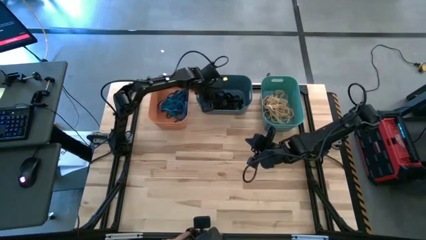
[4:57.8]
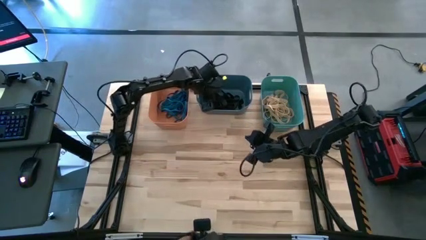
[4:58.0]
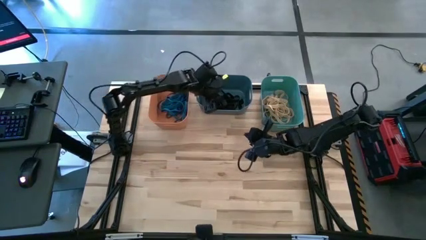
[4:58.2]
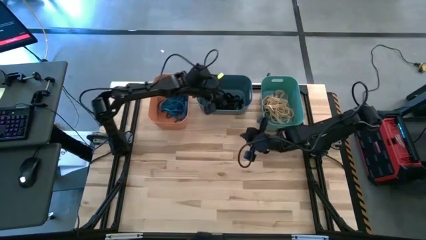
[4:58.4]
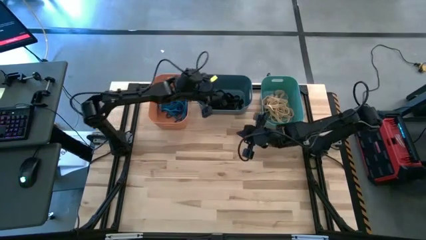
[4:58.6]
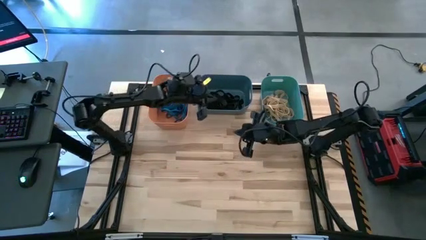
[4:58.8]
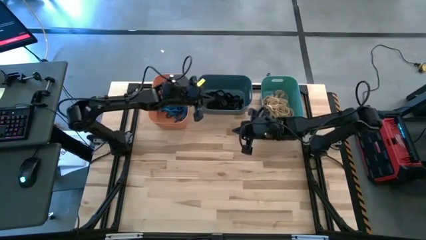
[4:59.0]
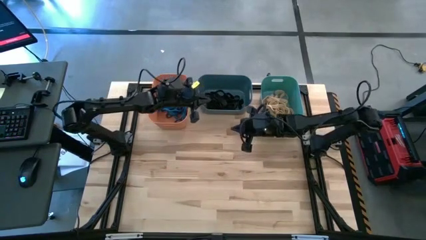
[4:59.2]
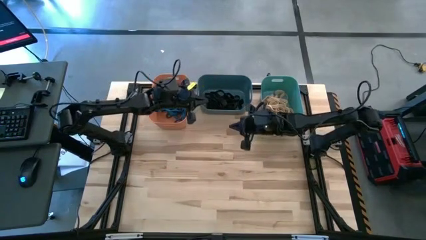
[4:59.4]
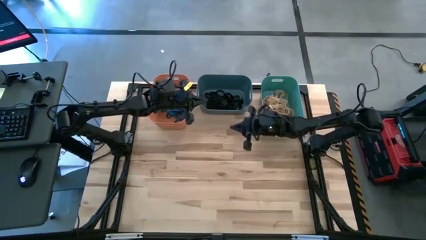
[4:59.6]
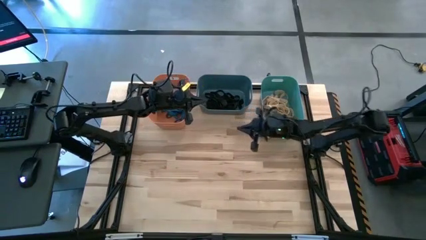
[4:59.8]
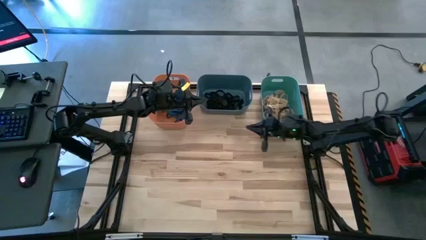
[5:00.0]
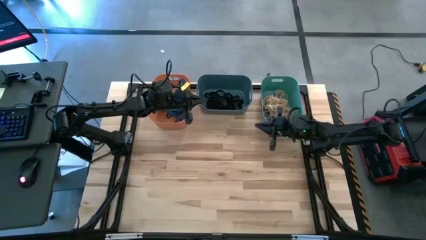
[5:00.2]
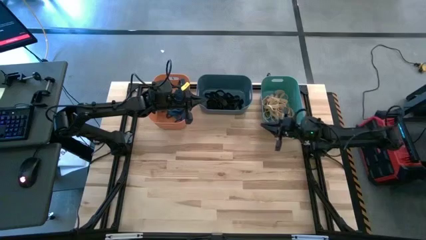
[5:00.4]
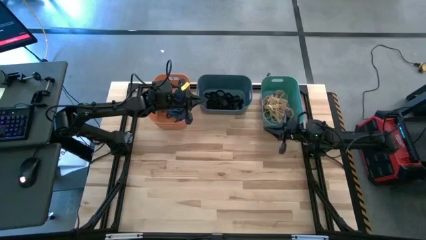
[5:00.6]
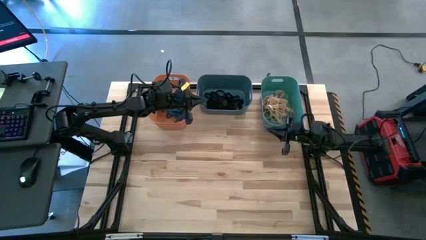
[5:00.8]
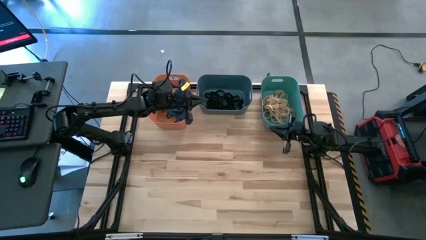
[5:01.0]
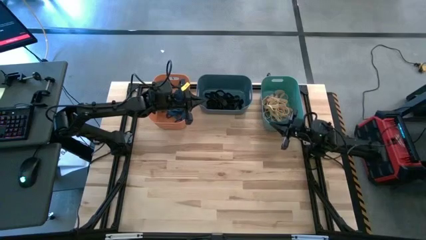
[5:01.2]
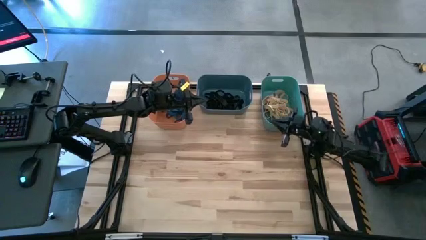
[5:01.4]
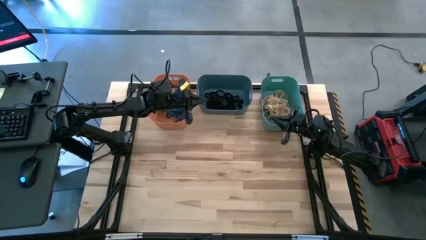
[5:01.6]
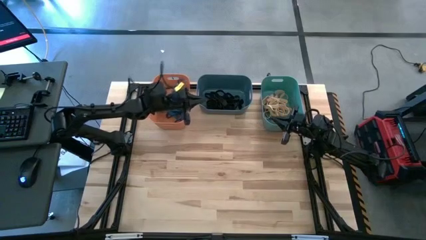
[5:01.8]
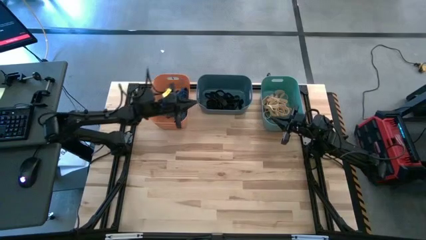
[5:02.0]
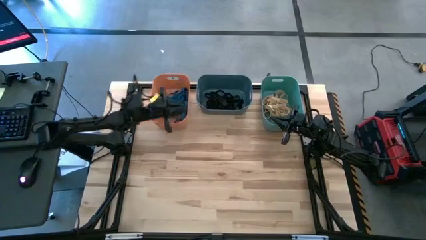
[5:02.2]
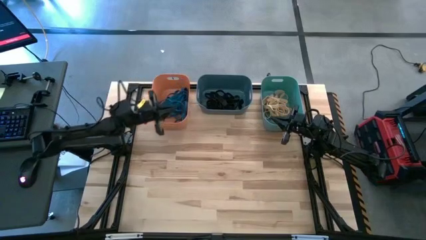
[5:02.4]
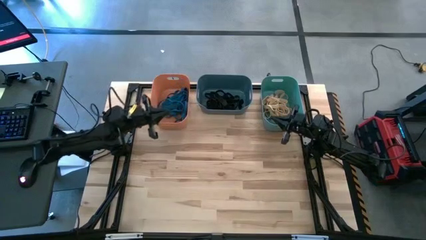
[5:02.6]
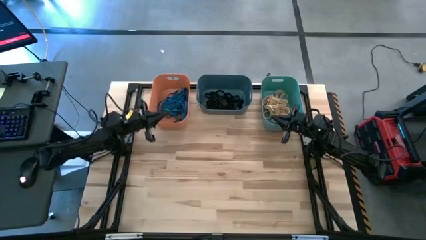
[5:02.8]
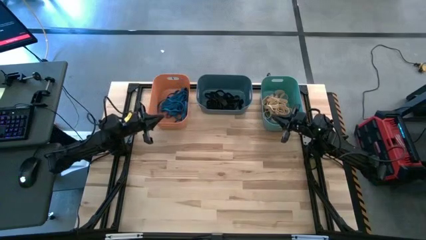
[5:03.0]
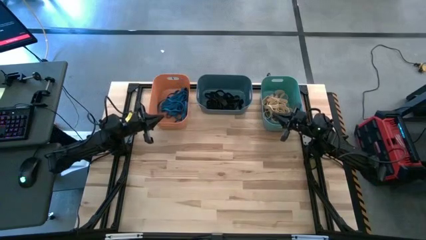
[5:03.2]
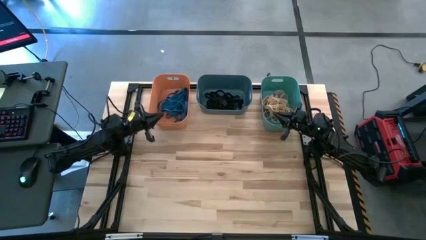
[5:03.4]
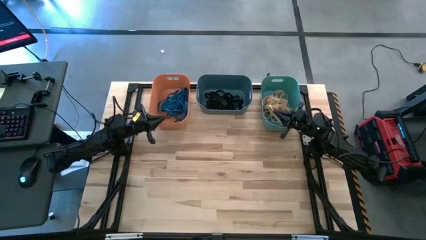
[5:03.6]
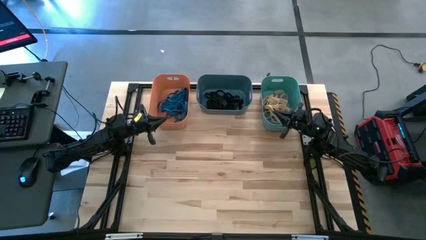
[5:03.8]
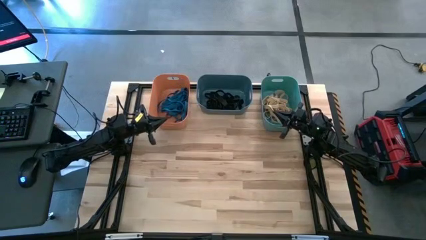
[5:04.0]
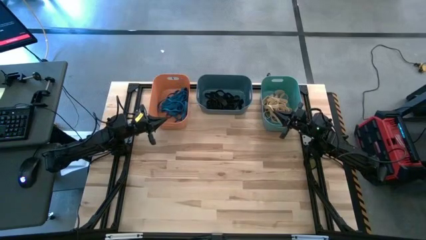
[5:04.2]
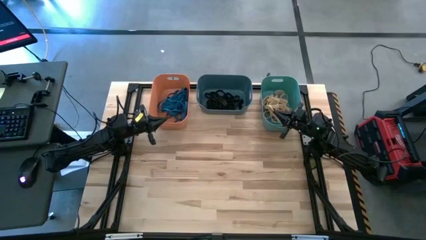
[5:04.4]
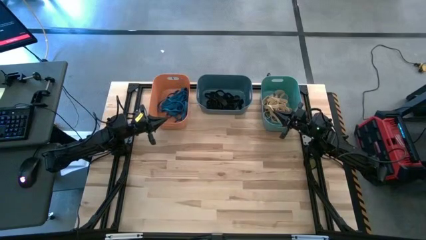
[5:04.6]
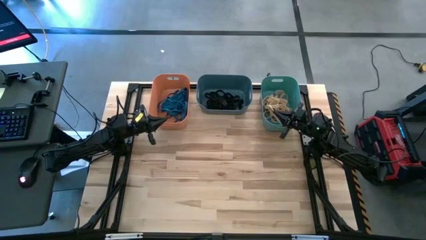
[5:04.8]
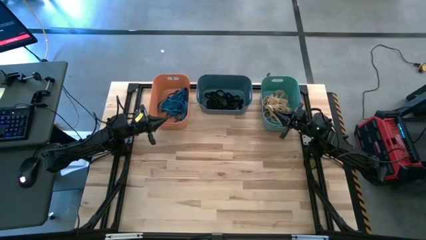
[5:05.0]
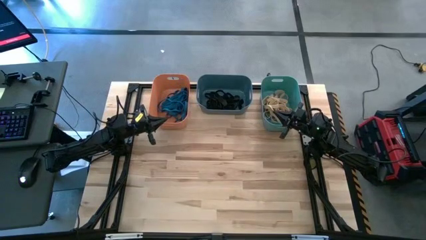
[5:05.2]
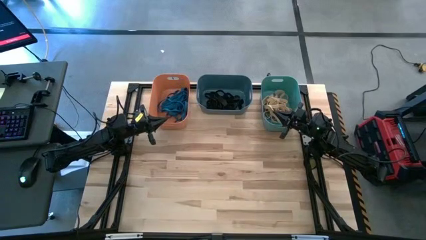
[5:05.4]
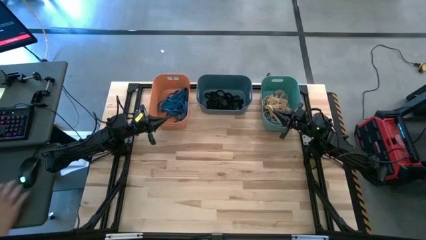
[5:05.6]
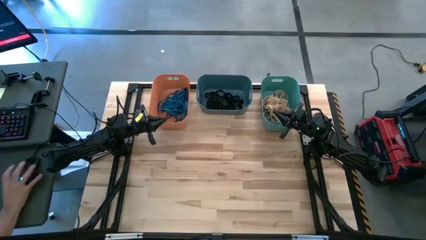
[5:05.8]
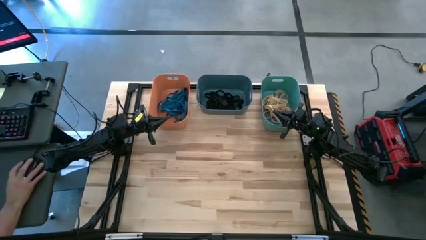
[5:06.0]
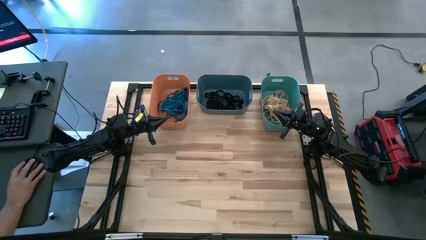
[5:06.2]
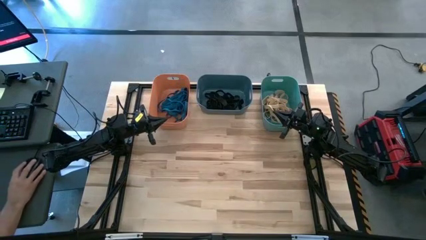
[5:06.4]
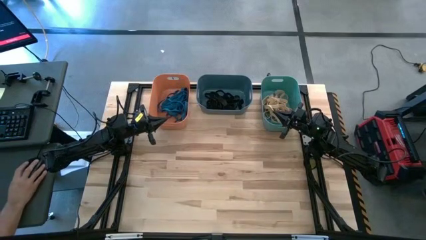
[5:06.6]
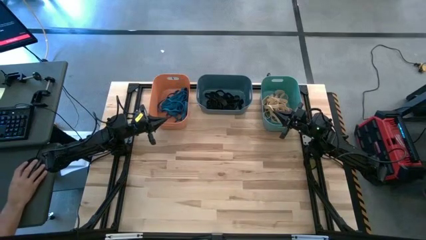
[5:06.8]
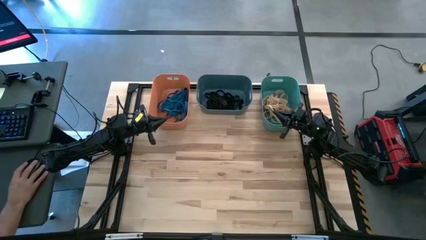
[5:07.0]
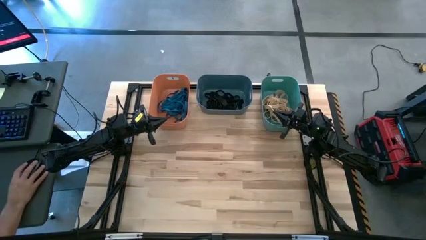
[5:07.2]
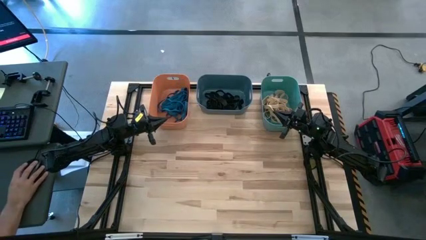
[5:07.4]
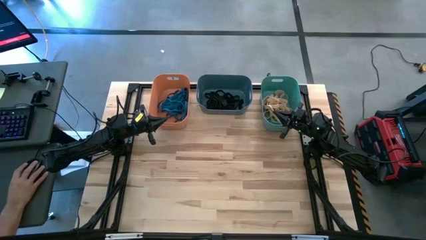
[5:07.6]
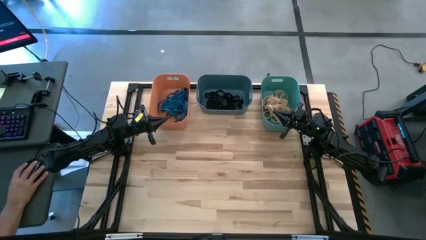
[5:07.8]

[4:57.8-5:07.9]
Task: Sort rubber bands into baskets
Return to Home Position

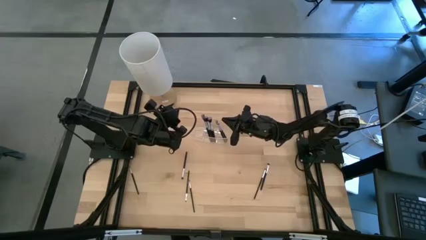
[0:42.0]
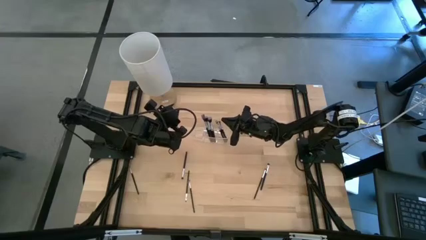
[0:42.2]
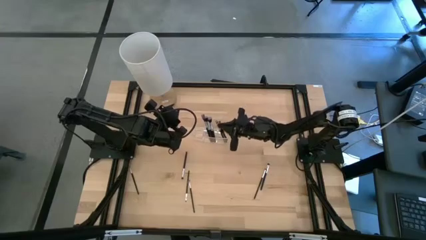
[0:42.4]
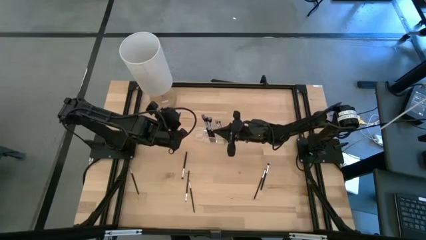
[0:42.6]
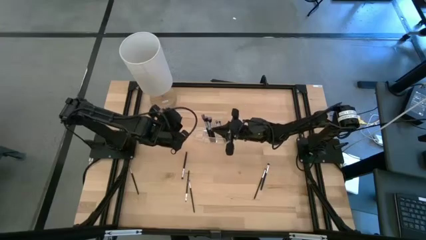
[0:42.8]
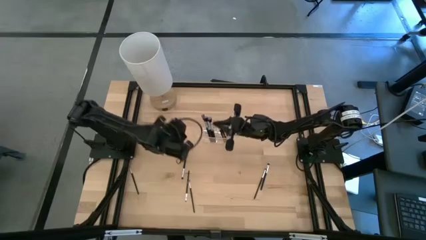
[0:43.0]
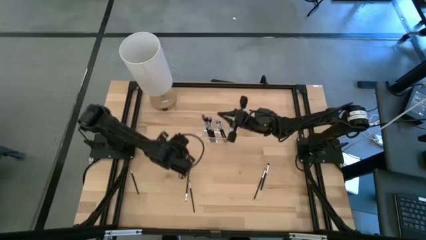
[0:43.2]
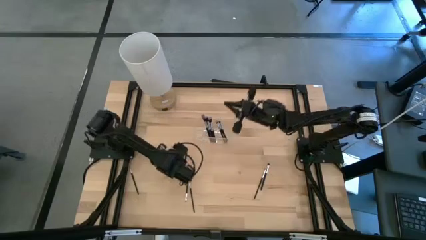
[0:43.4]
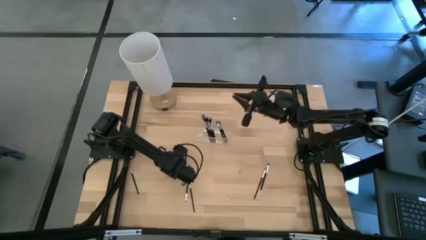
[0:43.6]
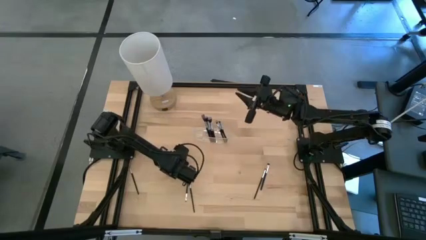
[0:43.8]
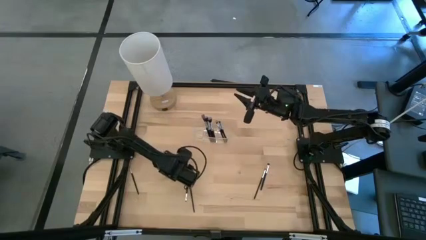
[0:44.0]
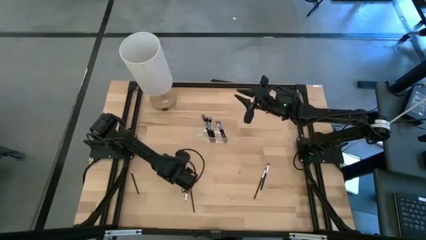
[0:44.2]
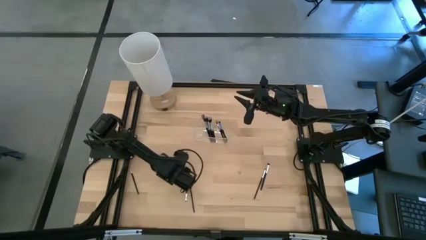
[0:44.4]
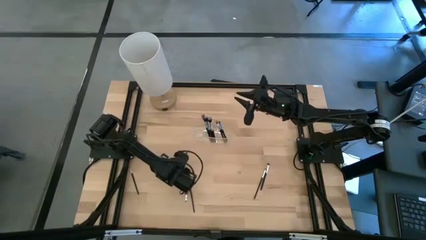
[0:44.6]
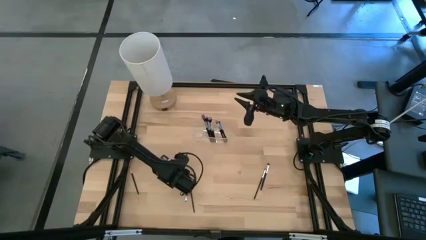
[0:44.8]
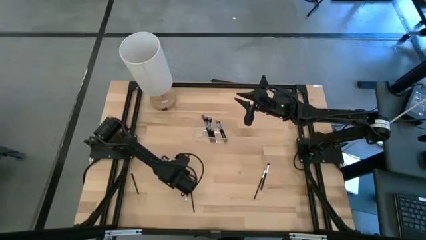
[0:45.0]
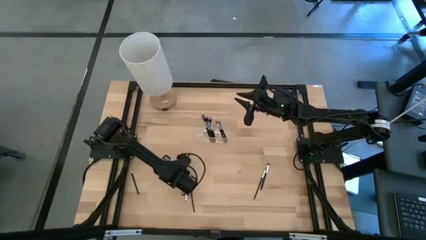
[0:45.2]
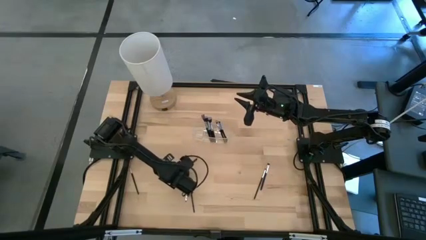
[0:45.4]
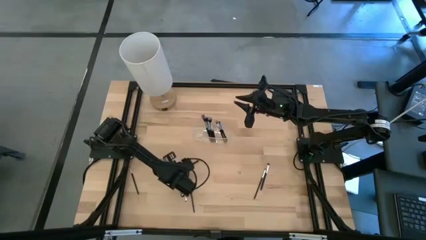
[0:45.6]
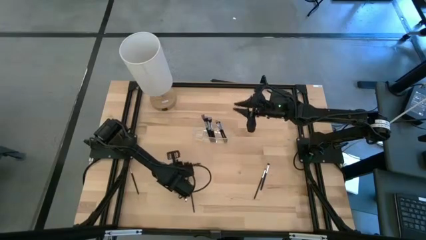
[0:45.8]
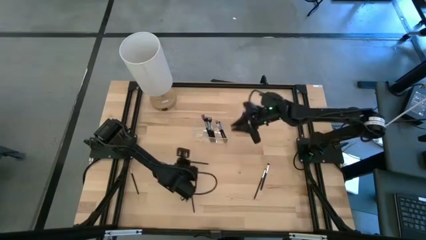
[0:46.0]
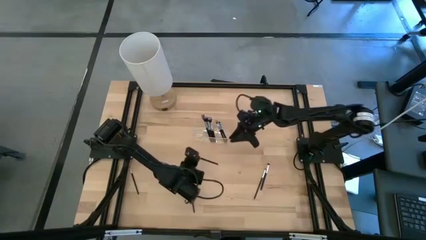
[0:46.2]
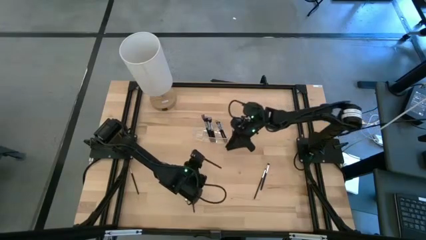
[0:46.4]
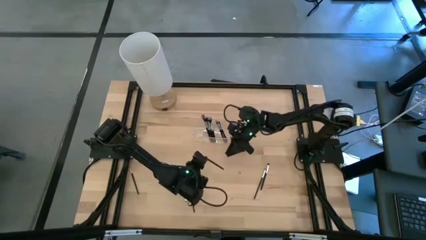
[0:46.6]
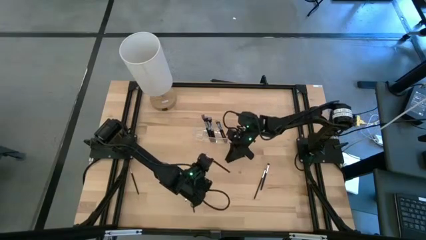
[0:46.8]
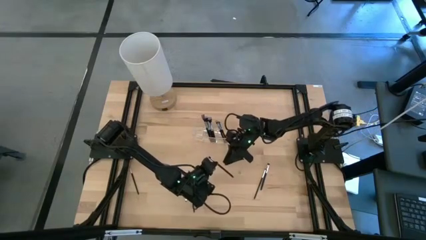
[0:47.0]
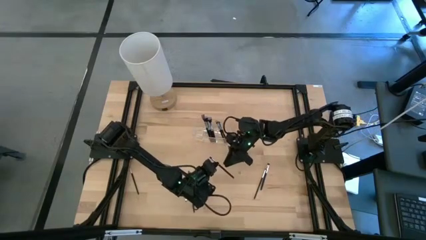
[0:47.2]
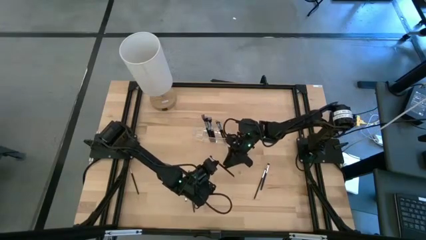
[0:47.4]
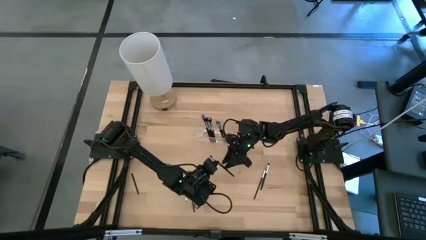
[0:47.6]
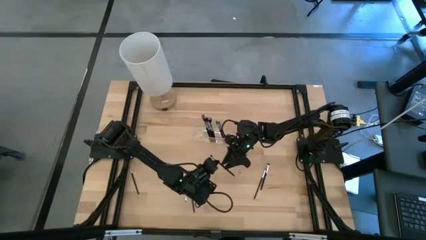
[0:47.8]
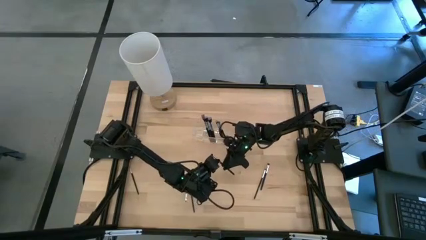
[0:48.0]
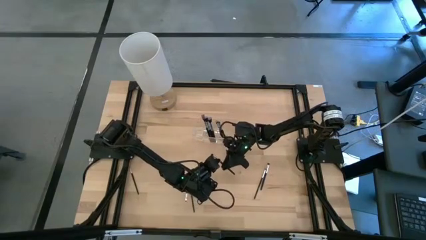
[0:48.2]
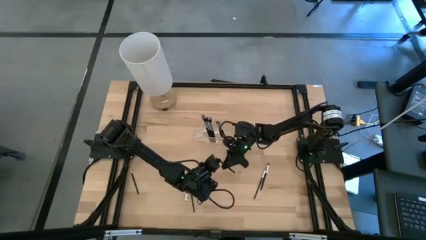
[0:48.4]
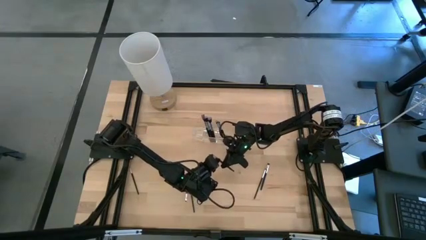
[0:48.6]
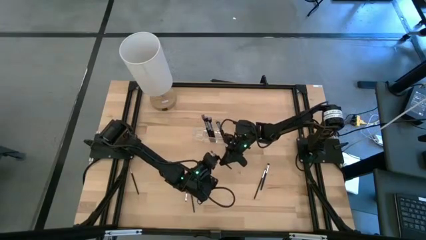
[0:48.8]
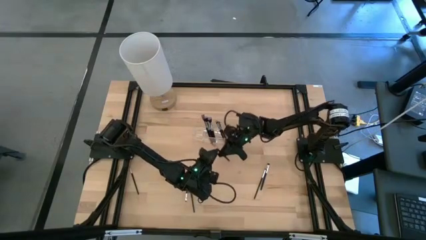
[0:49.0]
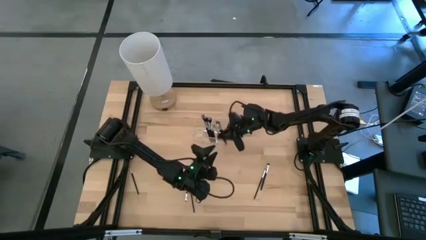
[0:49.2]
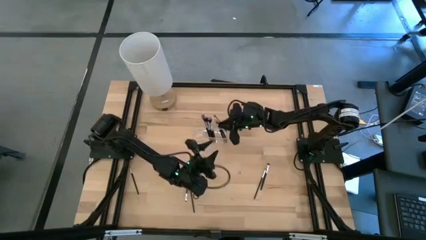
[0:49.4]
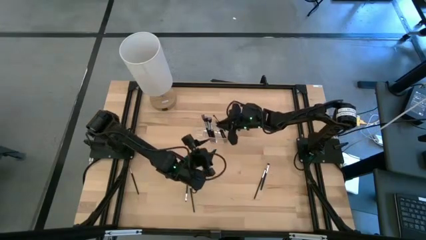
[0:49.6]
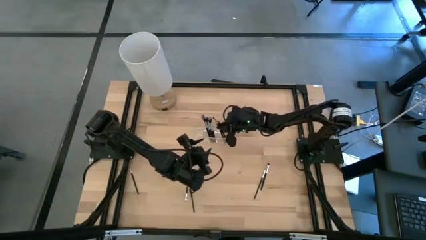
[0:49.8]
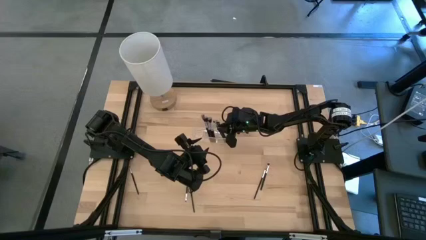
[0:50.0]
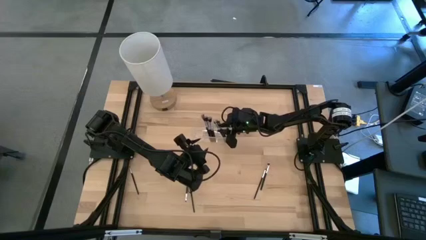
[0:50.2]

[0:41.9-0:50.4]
Task: Put items in baskets/containers
Put the black eyeshadow brush into the transparent organizer
